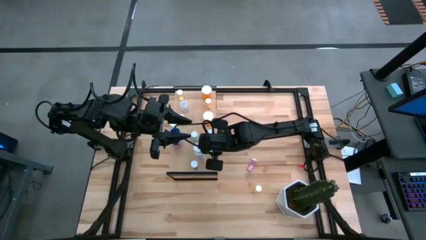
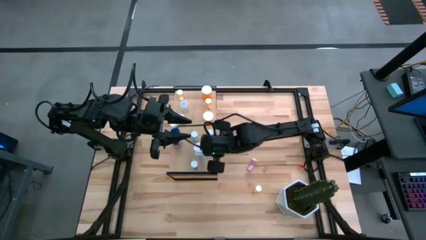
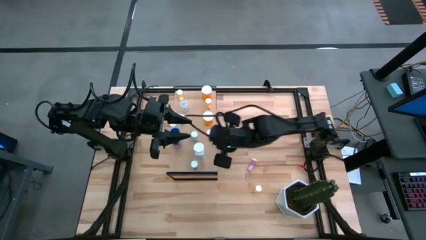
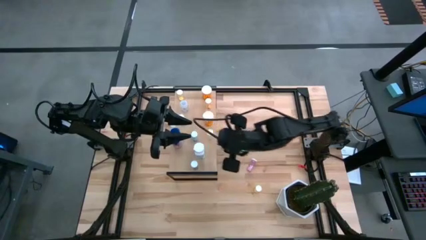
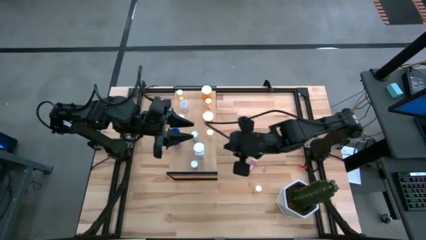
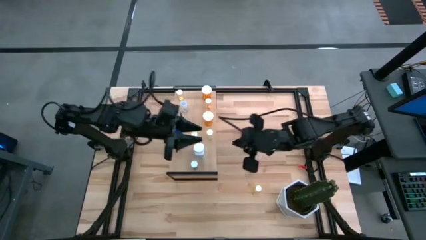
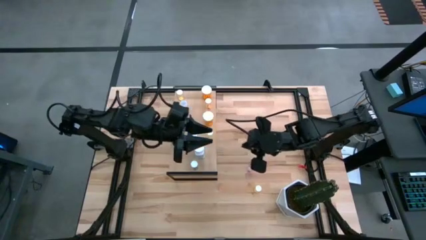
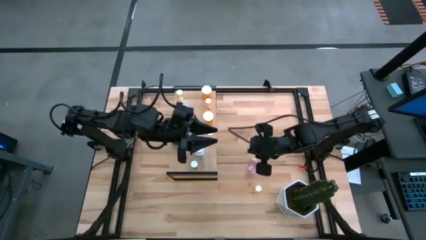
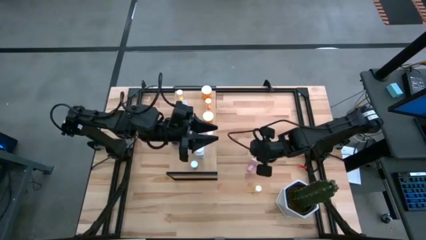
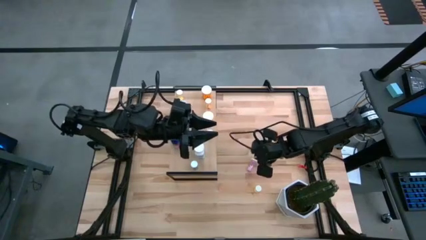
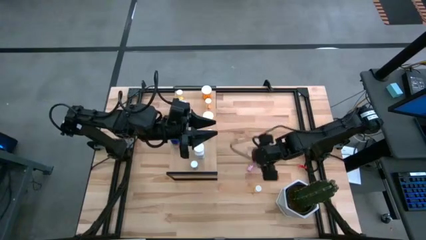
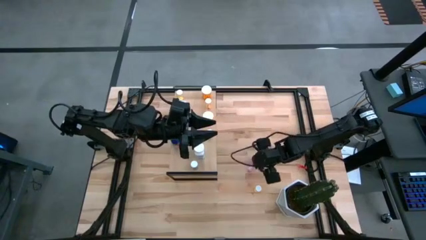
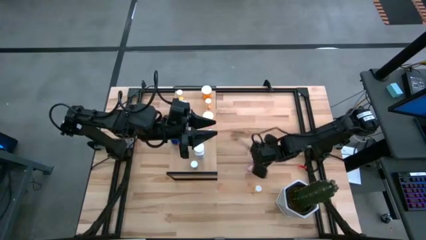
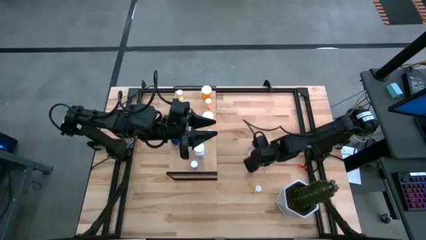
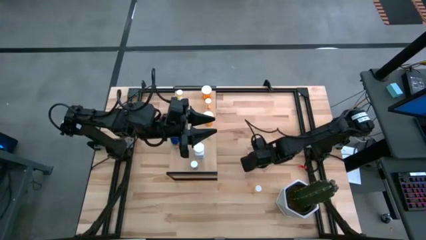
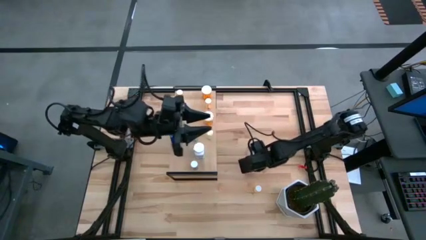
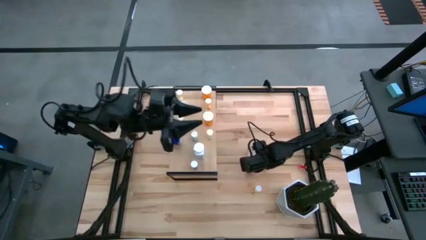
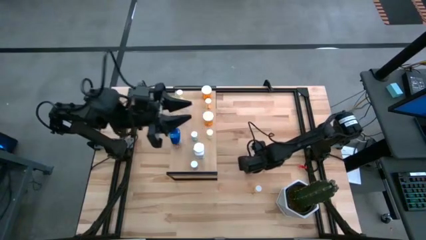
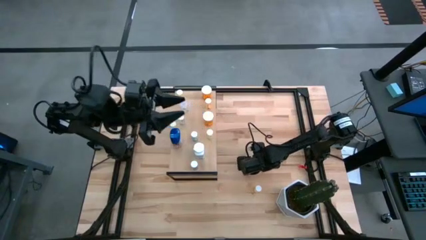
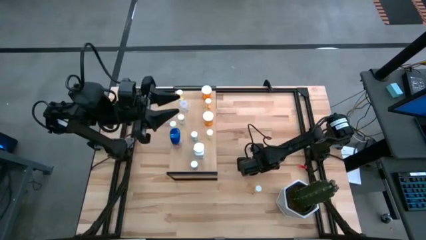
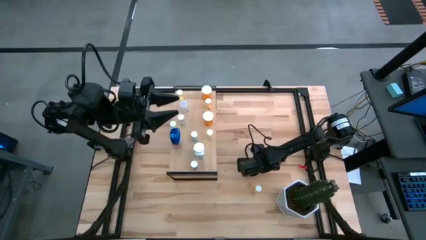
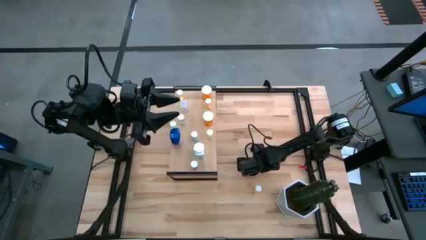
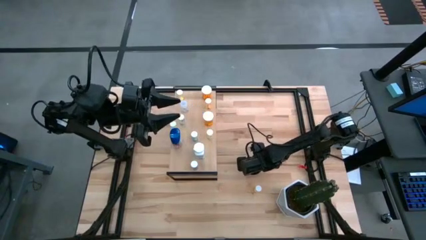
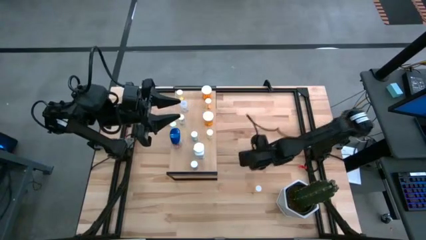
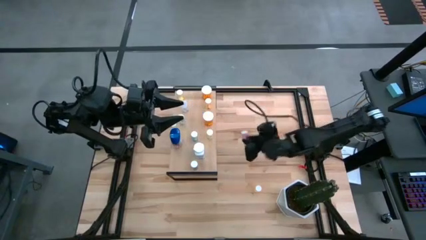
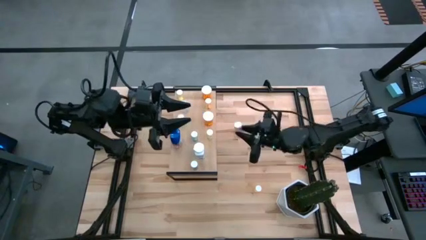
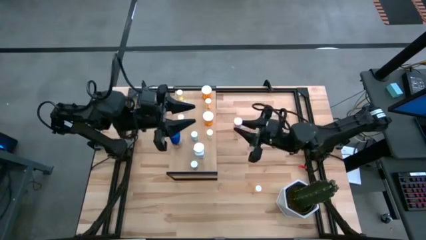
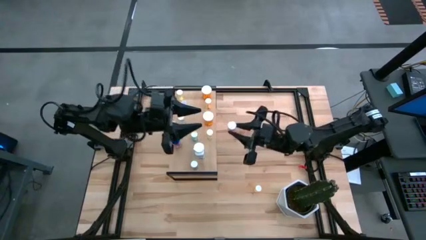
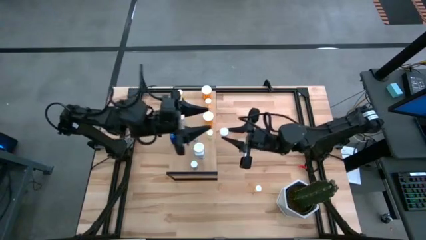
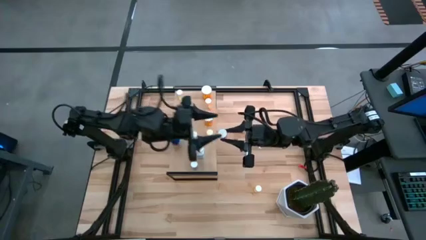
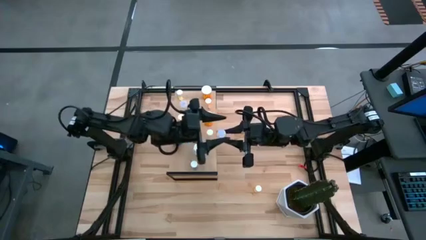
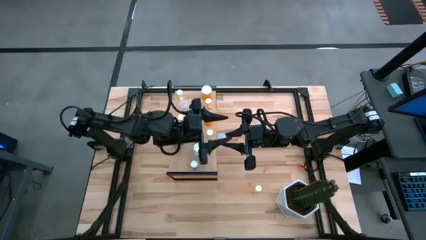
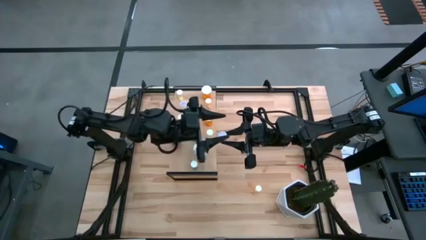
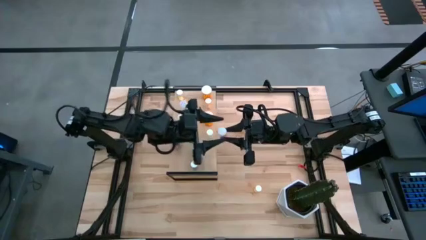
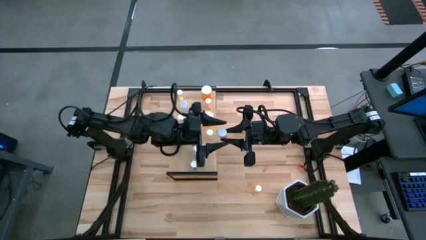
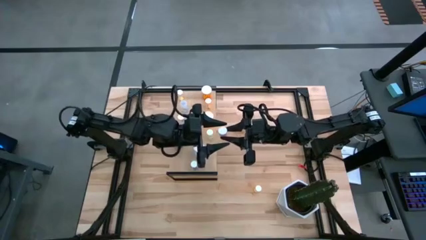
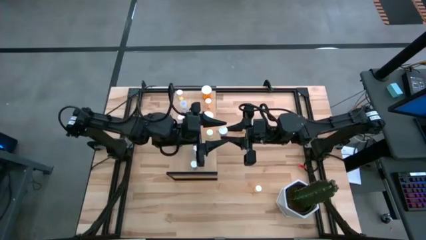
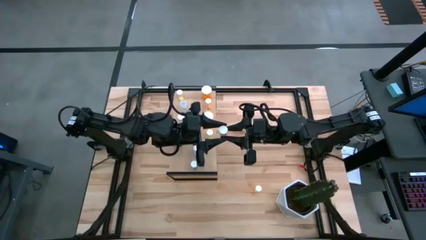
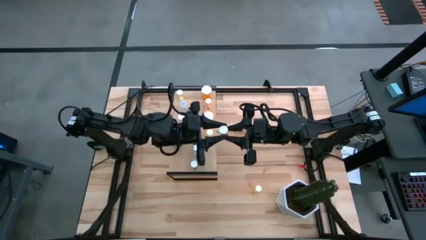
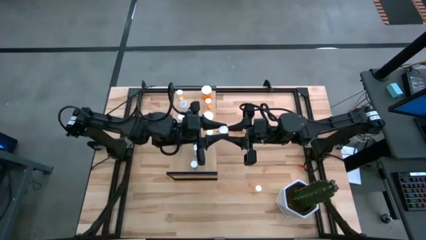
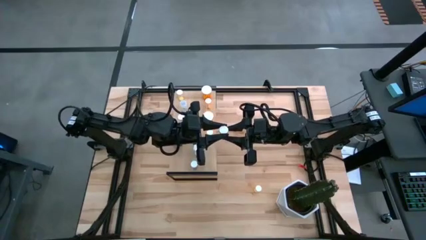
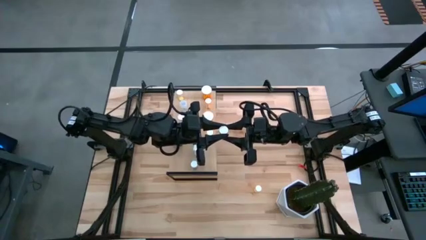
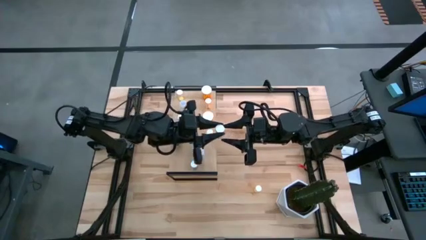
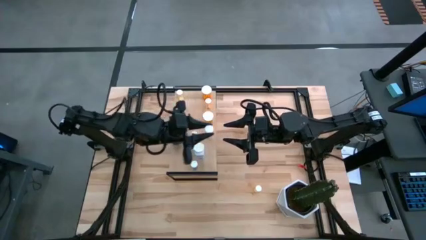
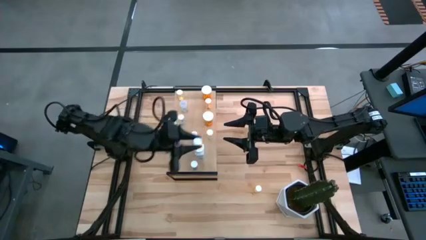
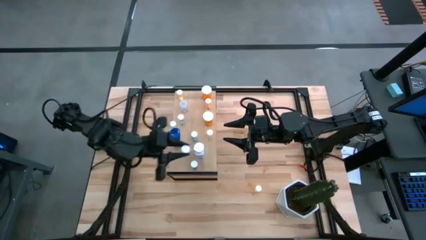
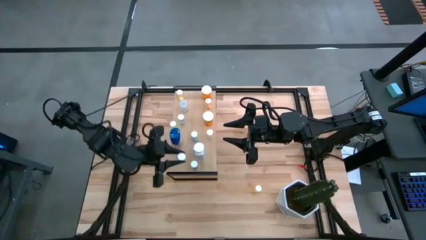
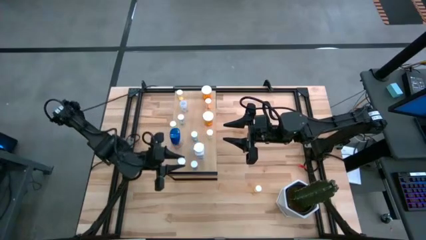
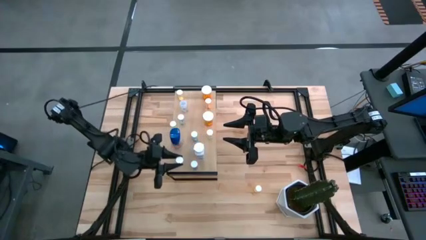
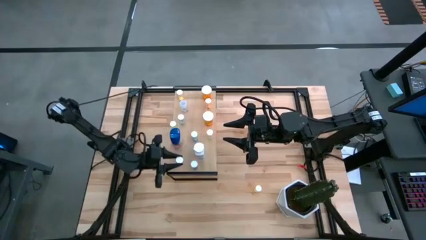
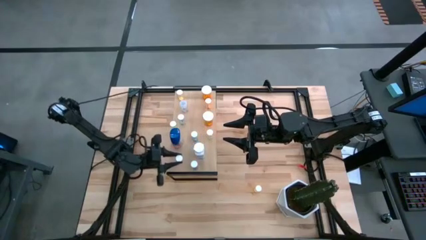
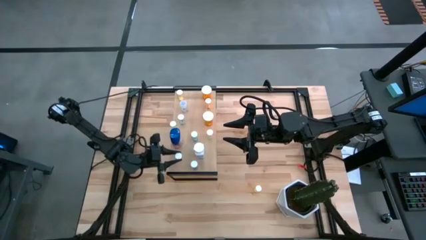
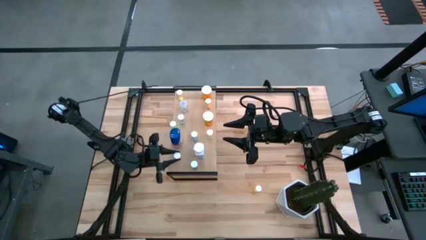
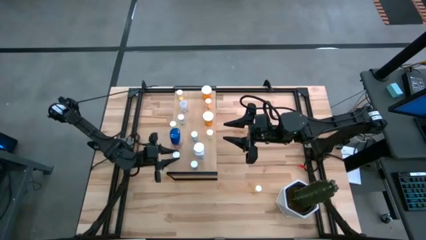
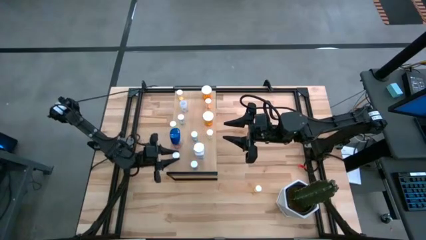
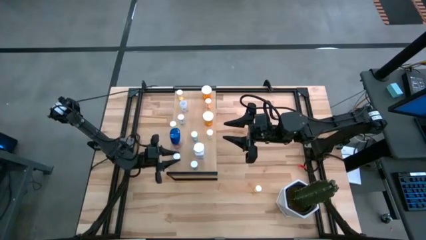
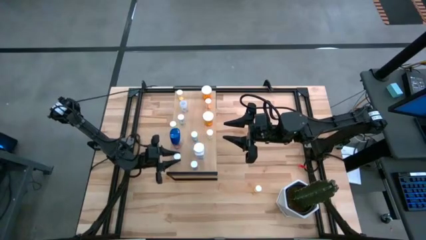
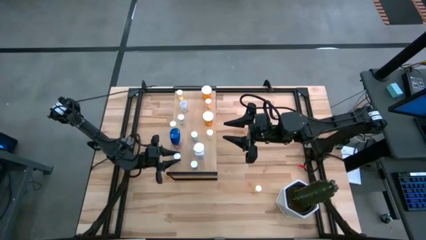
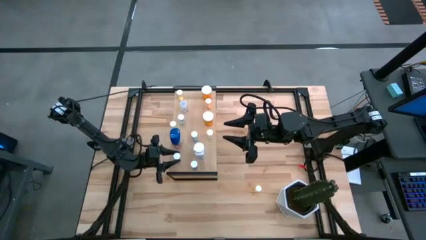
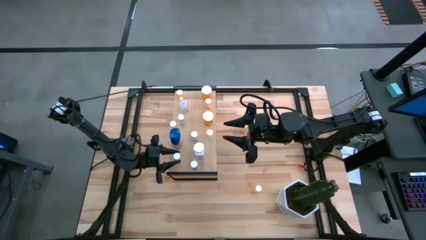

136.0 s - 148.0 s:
Task: Pick and place medicine bottles onto shelf by color
Put the pink tablet bottle on the shelf

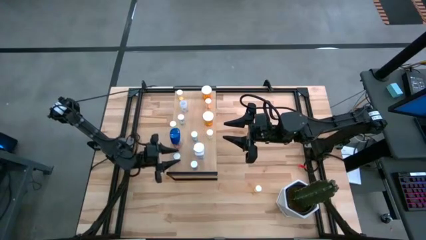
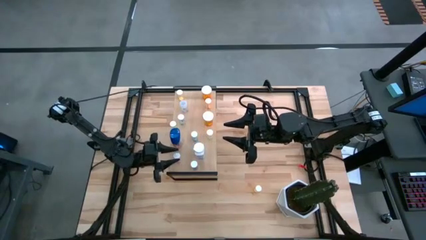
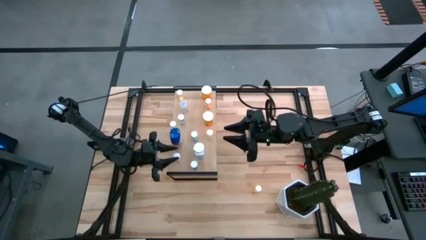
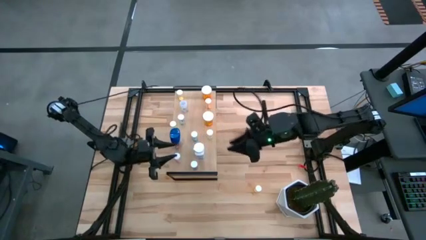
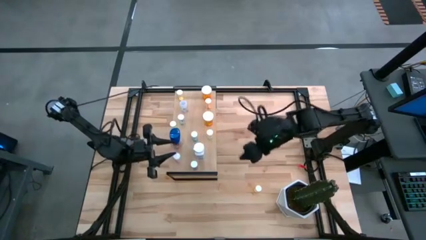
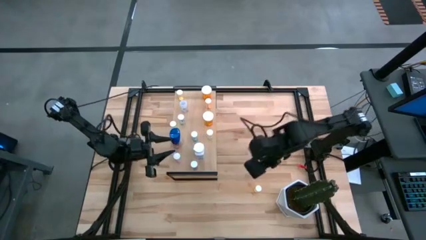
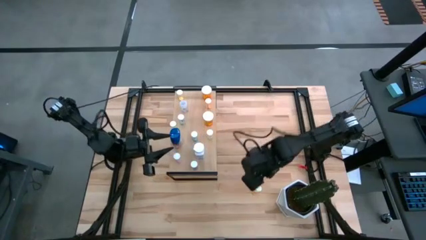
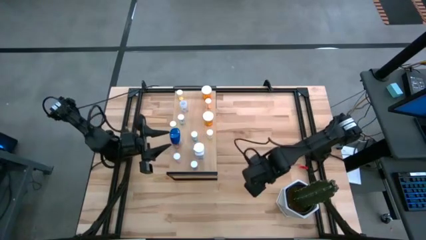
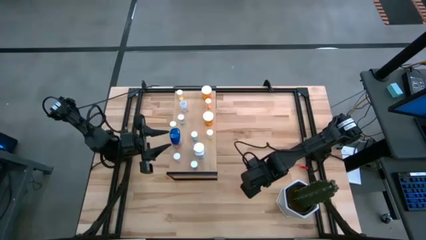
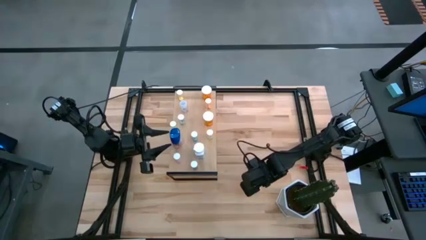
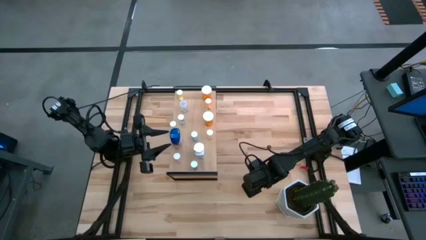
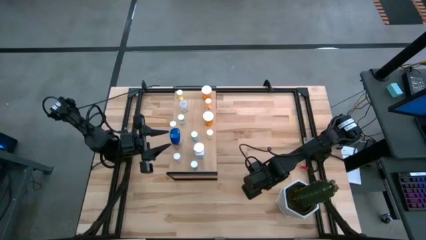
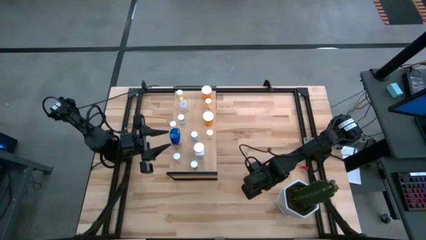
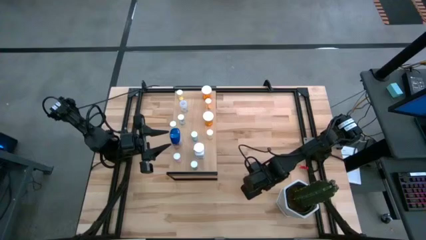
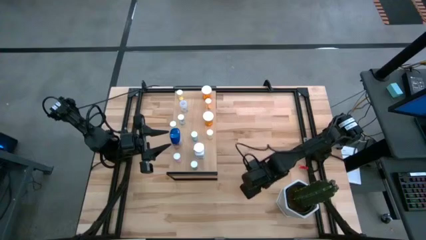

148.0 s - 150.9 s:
Put the yellow tablet bottle on the shelf

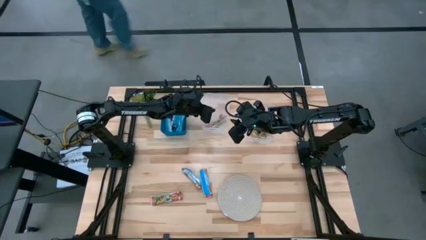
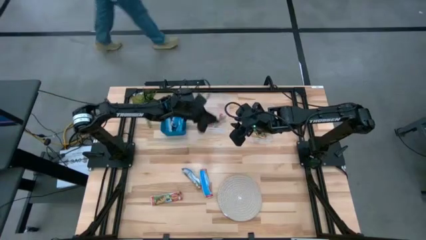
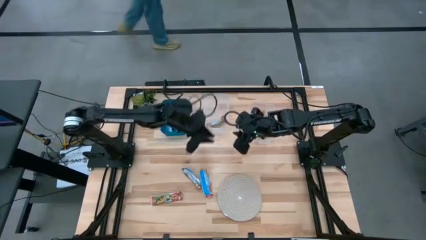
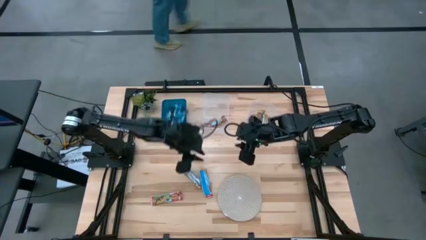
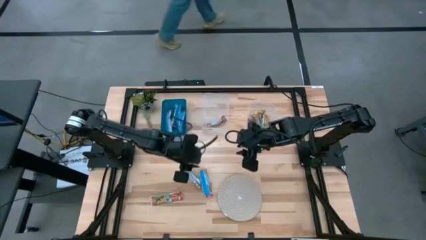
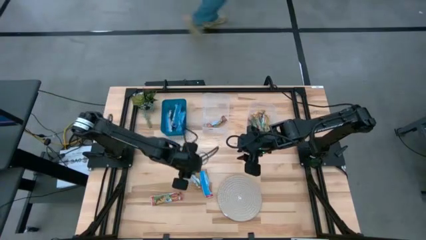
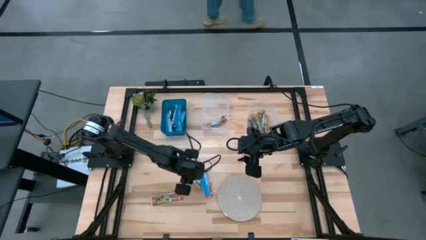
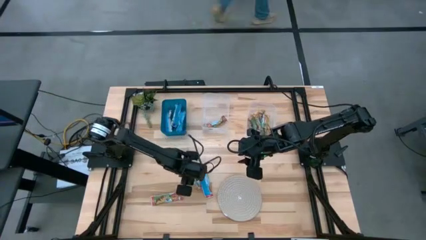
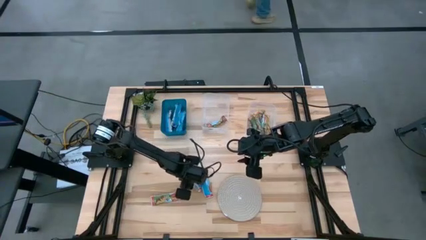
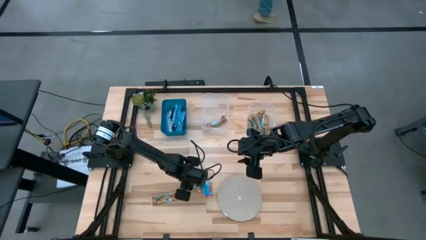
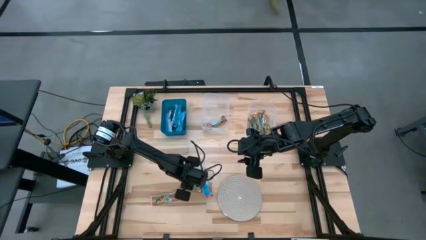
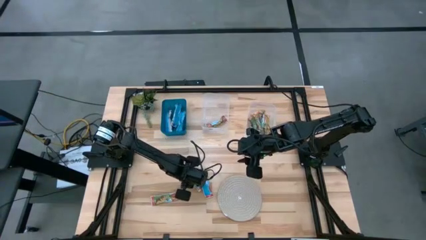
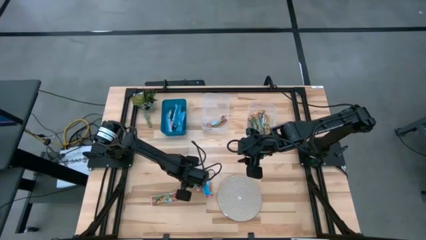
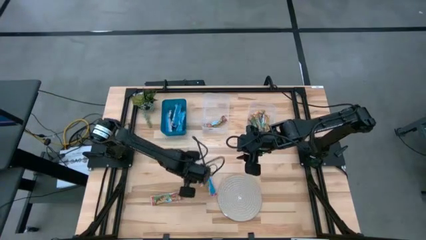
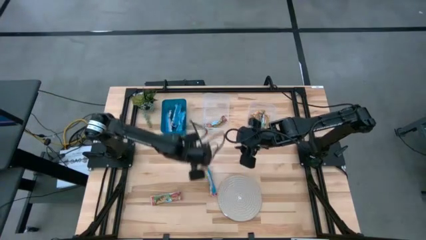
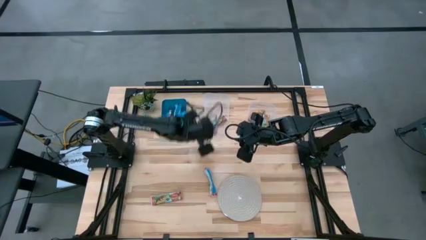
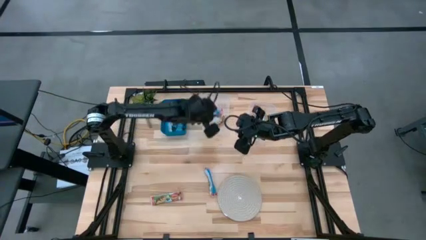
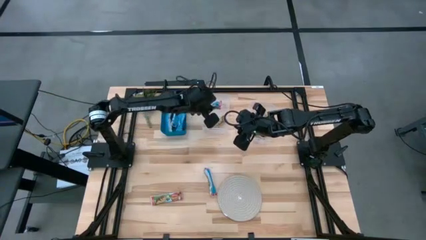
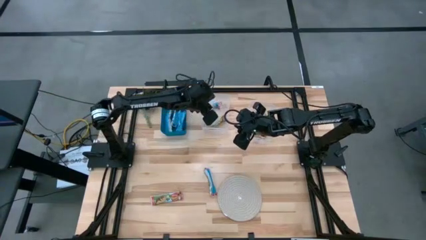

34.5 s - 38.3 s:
Task: Pick and place Granola Bars by type
Put the red granola bar into the left transparent bin
